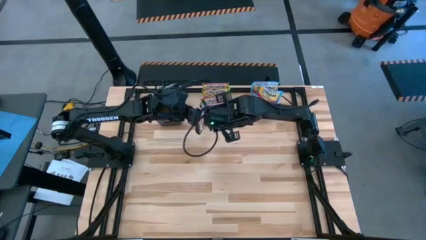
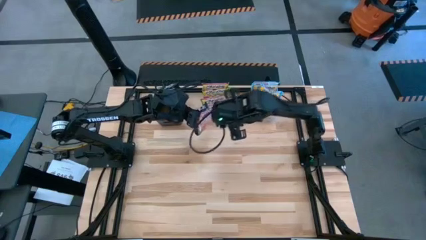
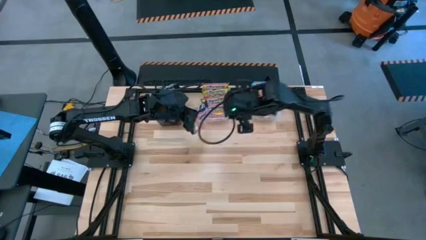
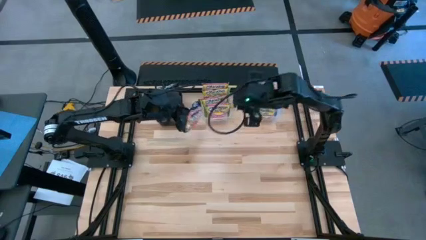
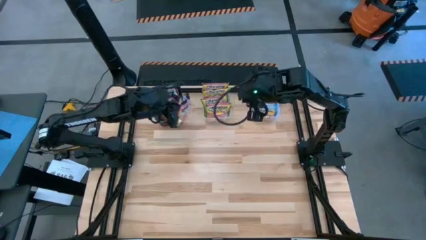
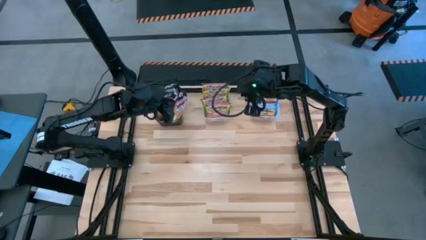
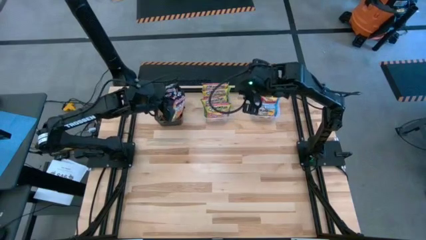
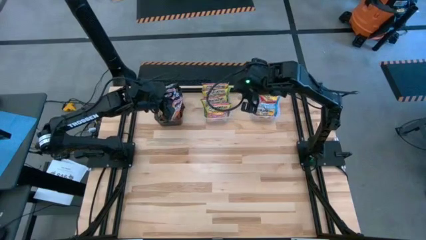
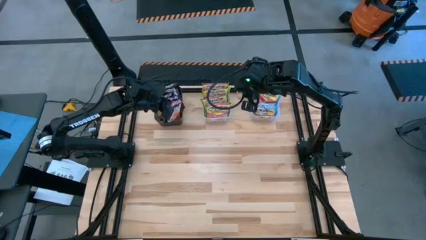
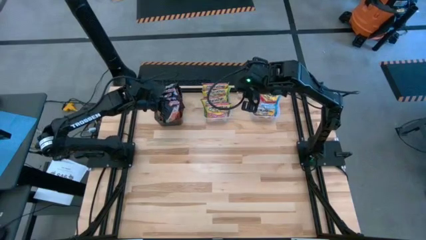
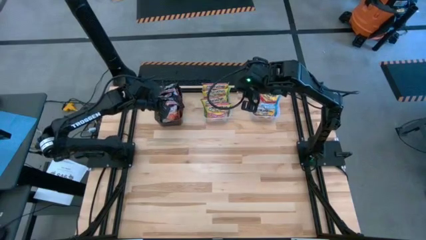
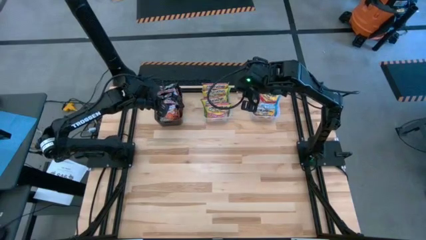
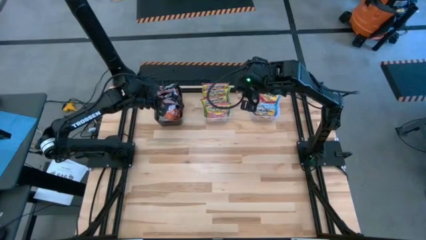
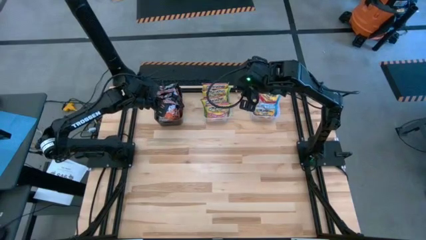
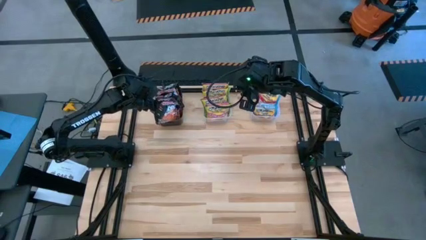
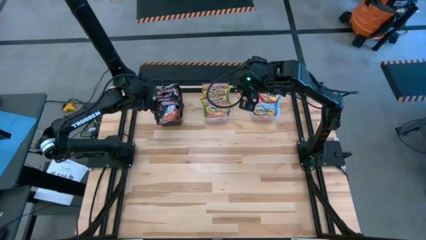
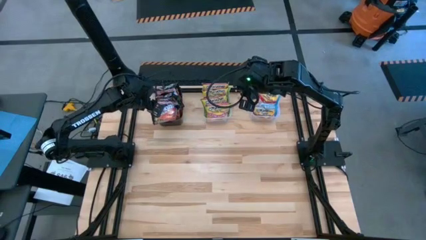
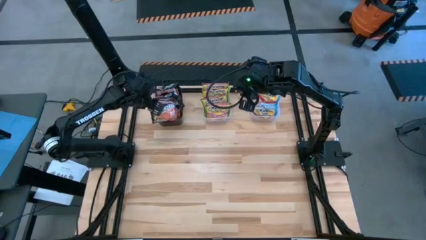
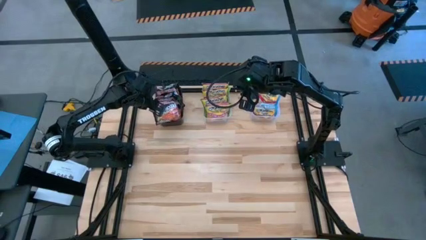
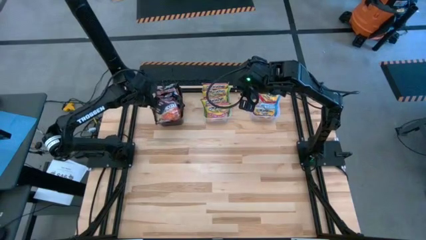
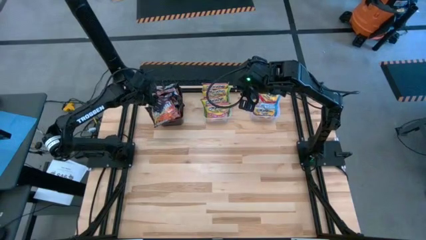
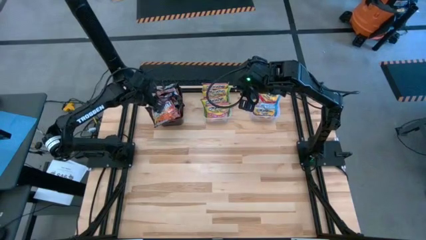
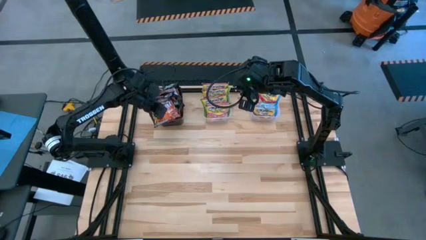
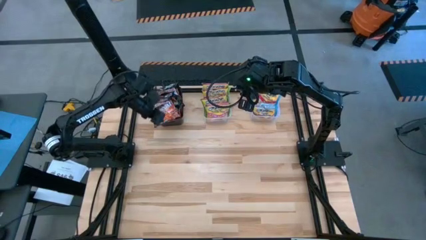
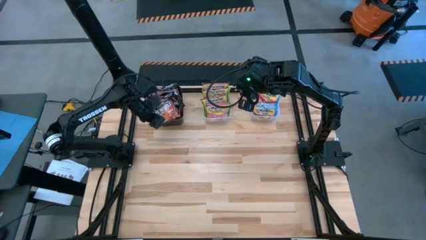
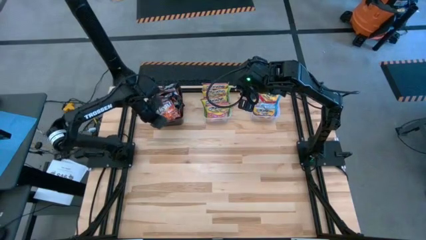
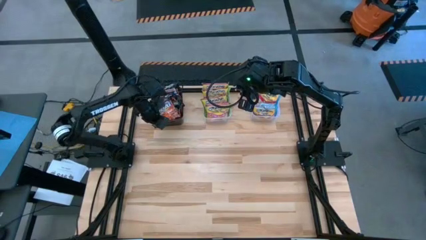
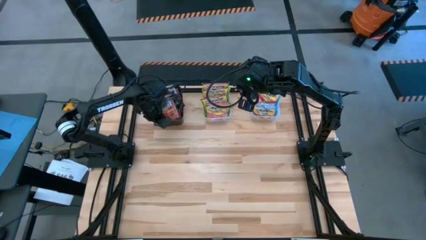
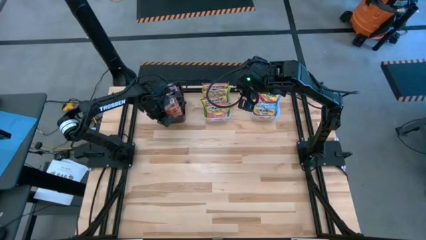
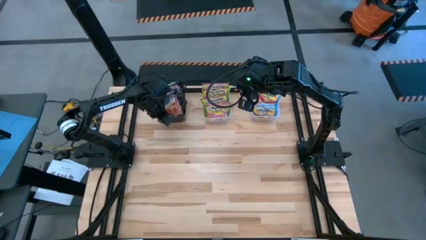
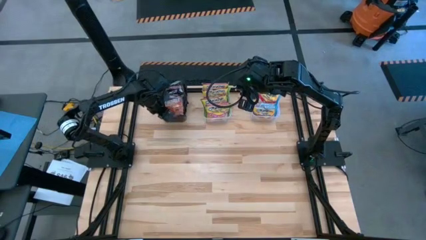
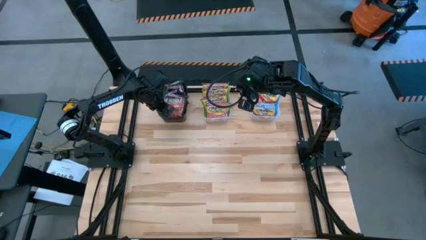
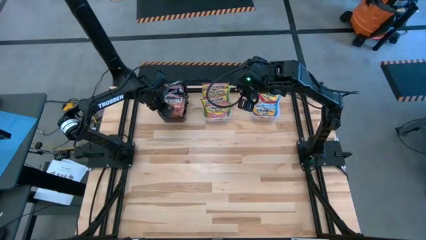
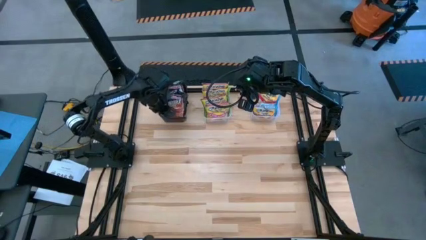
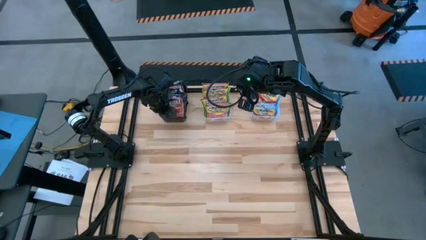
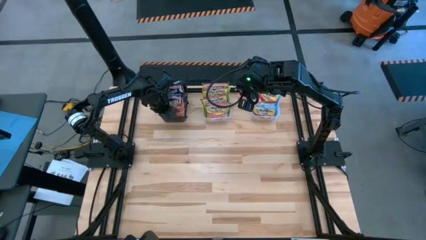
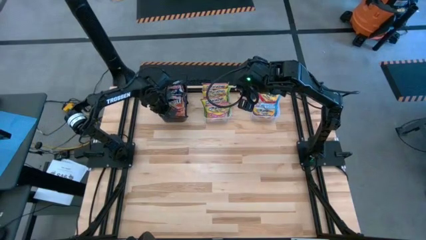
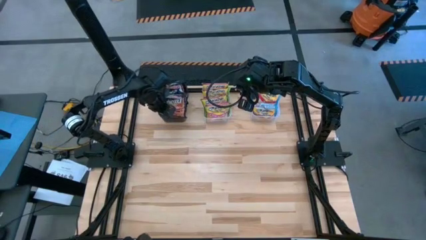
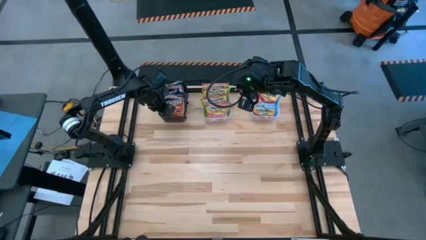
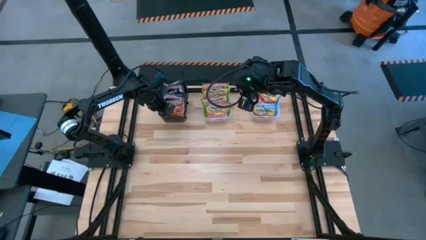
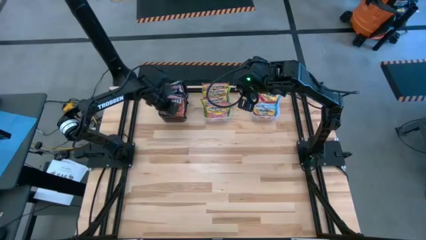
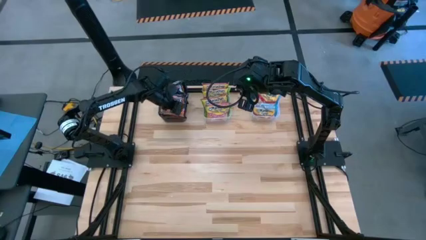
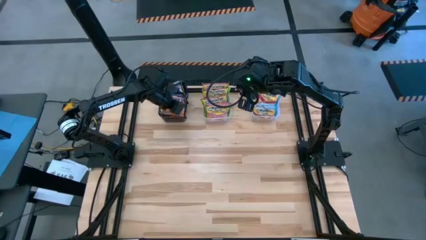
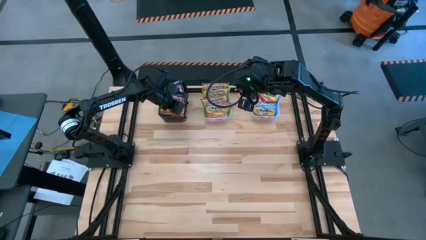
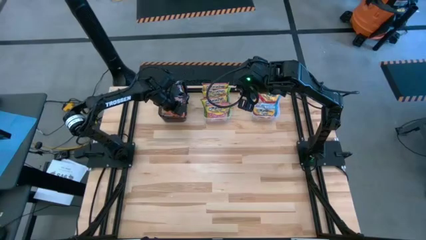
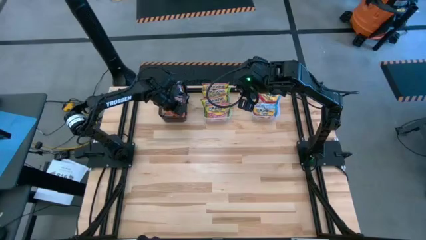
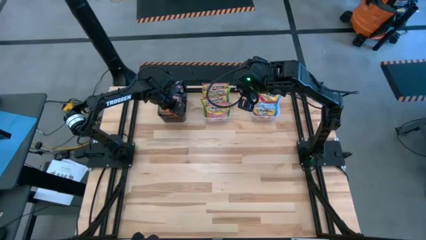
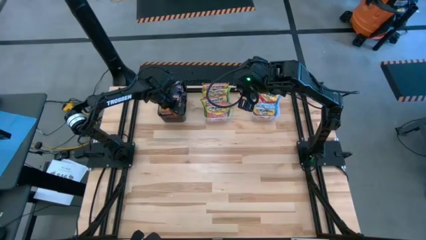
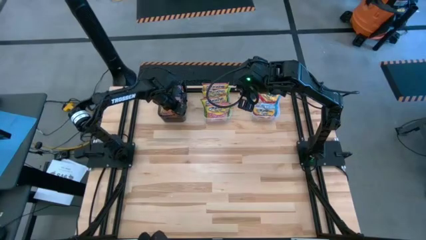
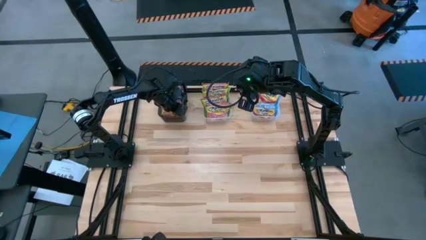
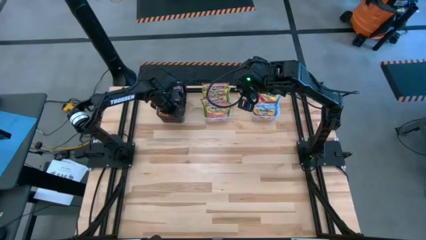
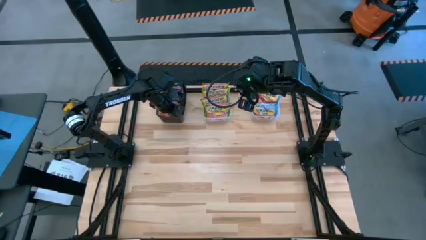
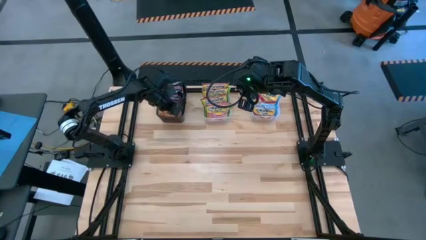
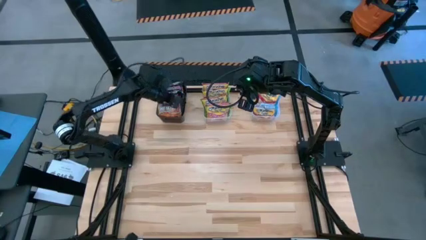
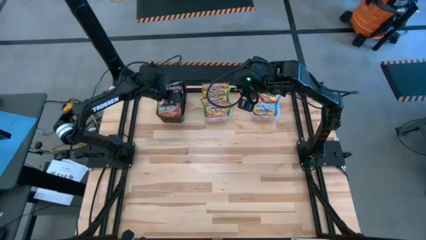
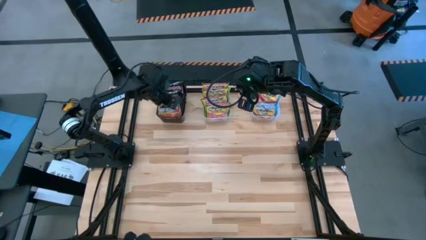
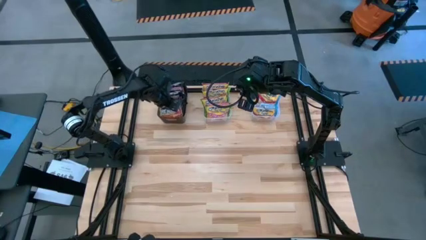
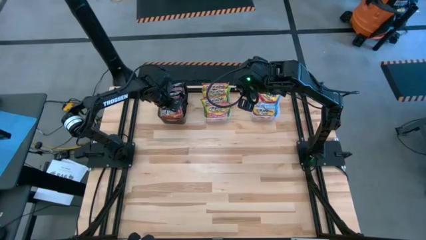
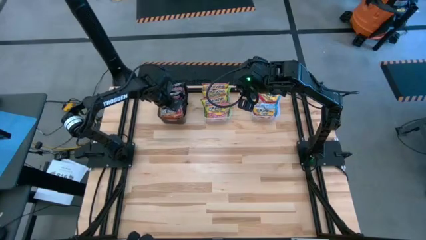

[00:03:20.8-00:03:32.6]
Task: Sort Maruchan noodles
Put the black noodle pack into the black bin

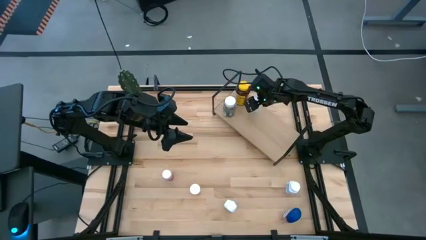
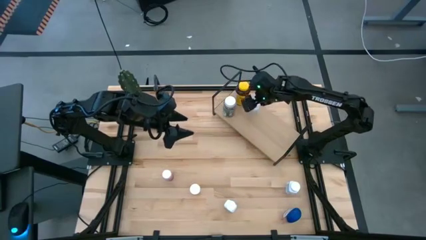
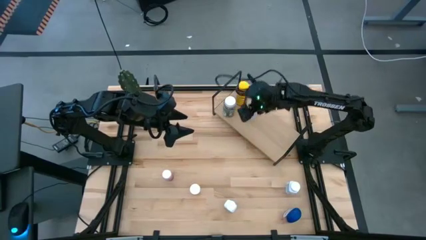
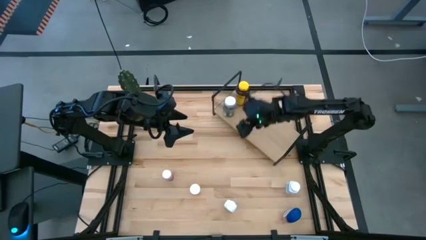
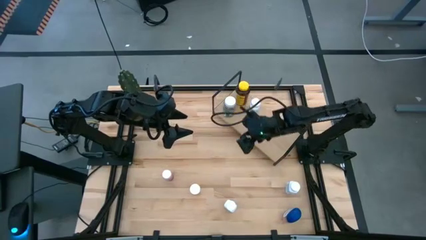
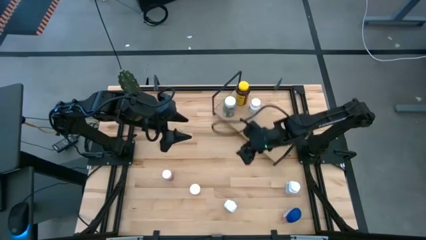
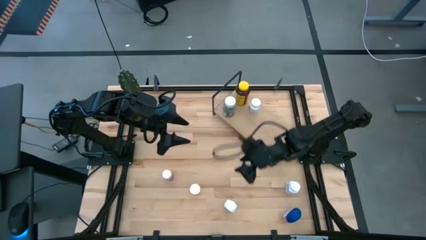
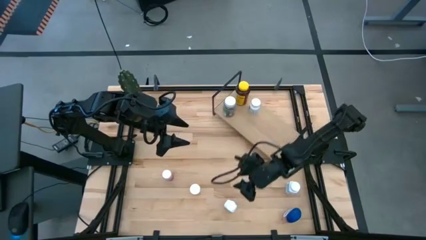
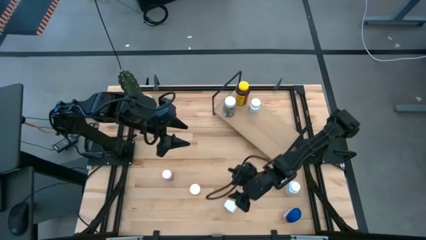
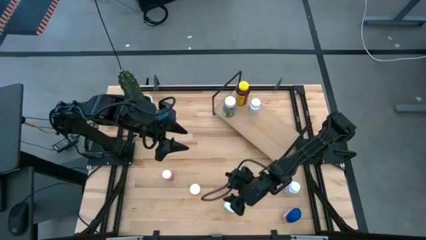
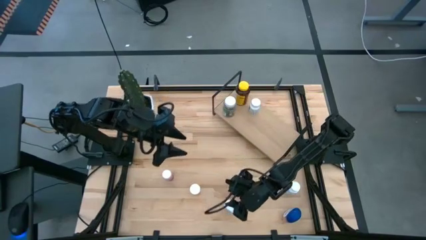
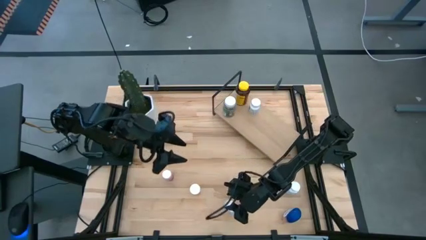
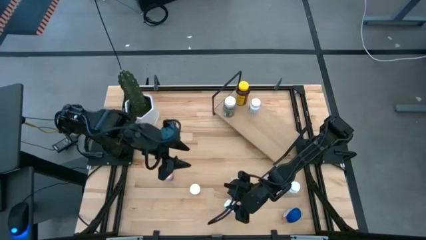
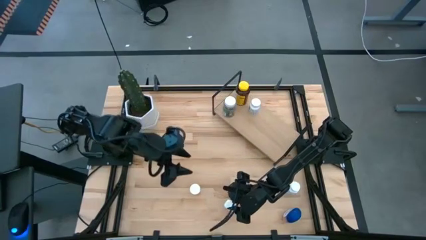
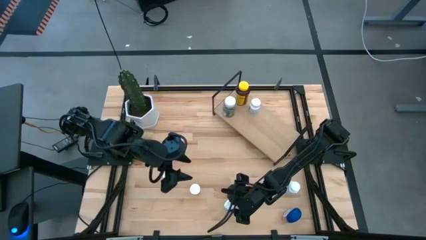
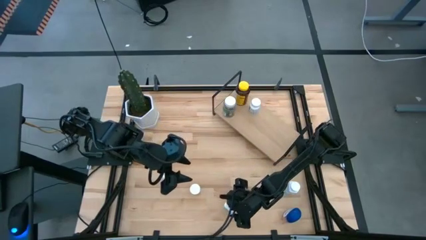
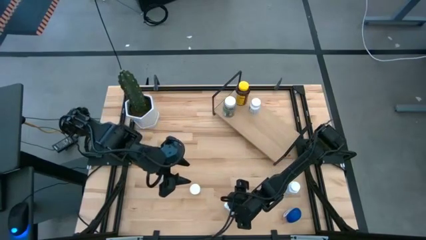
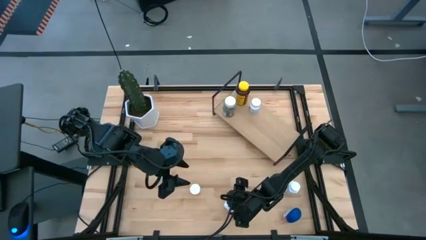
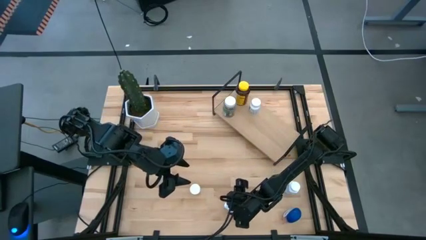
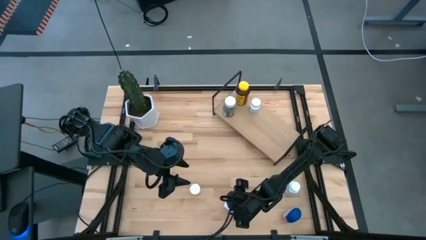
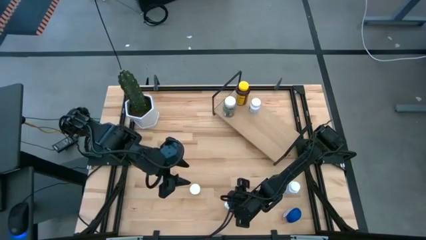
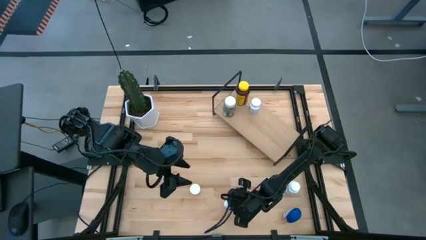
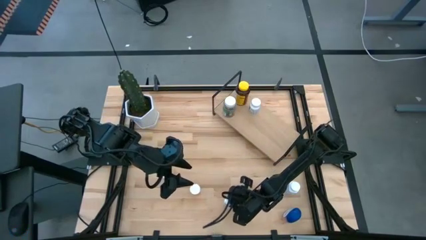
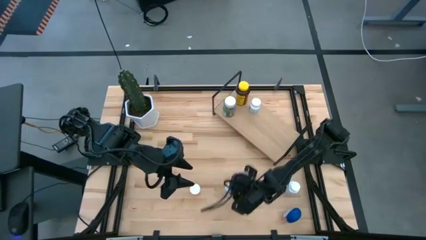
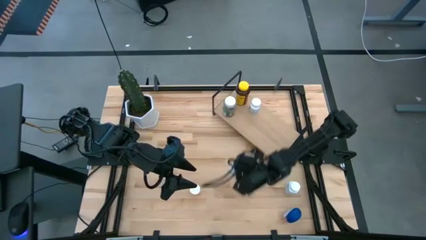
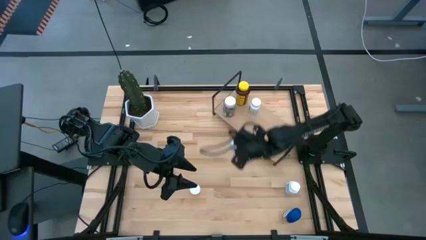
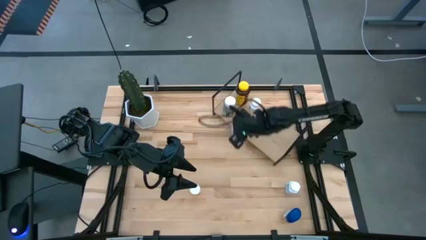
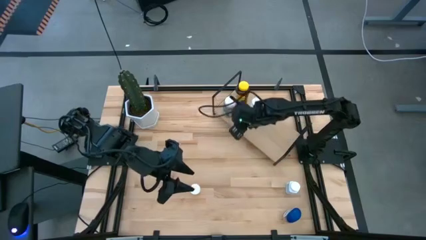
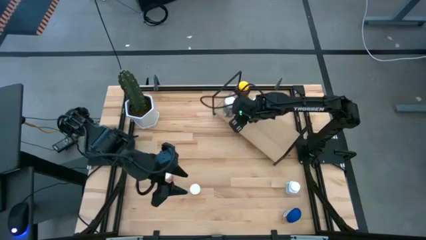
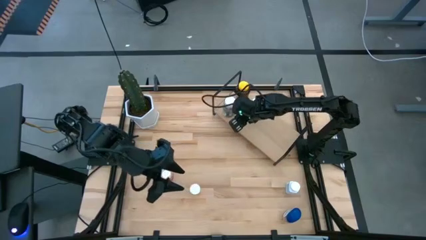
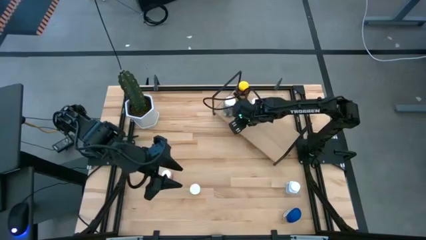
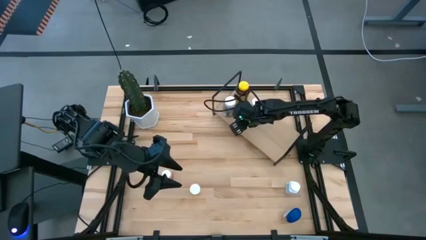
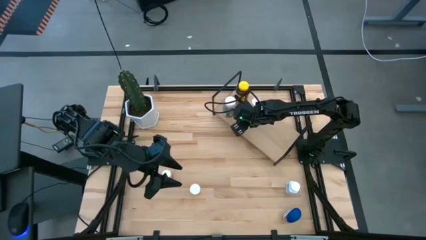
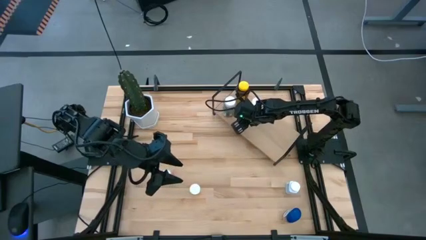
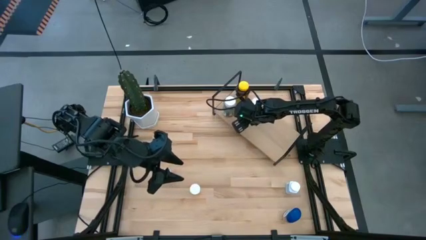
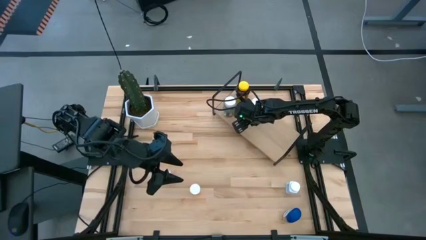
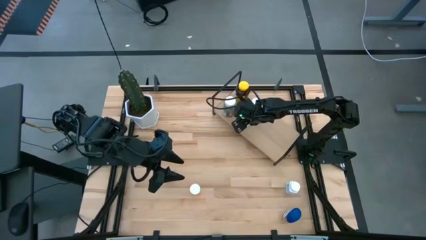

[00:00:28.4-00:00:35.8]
Task: Pick and place medicine bottles onto shelf by color
Put the left light blue medicine bottle on the shelf
